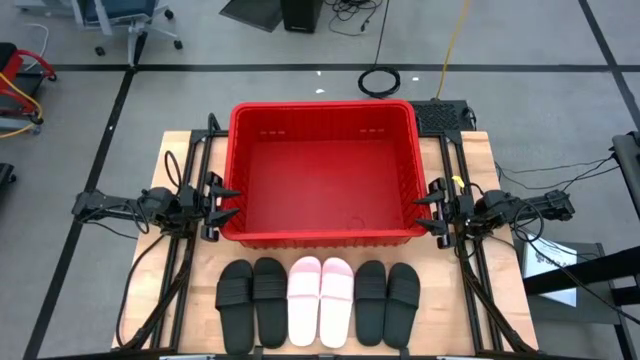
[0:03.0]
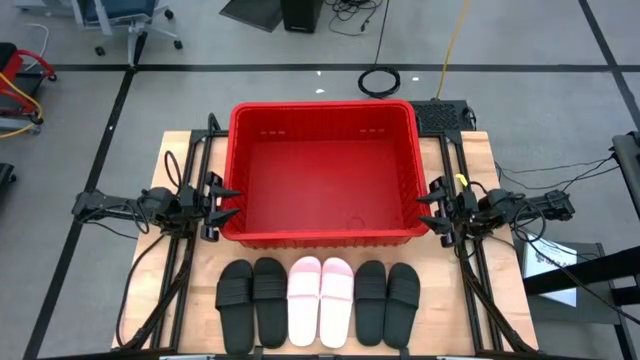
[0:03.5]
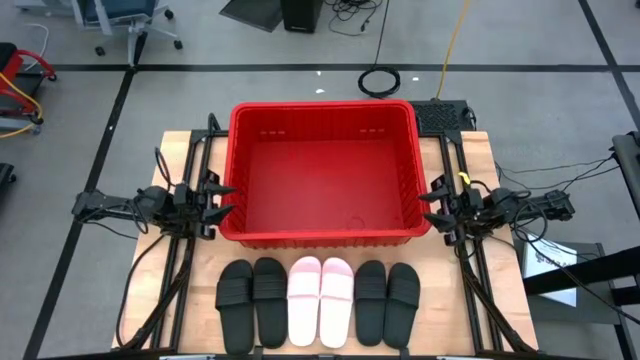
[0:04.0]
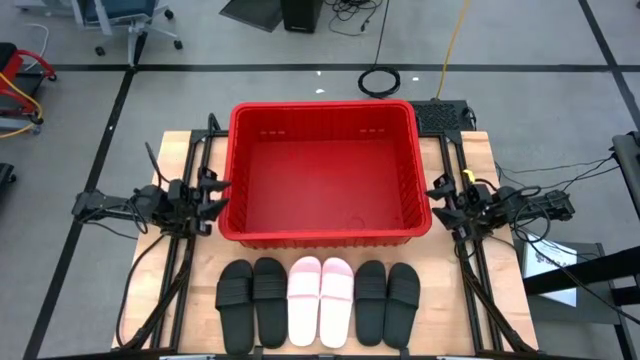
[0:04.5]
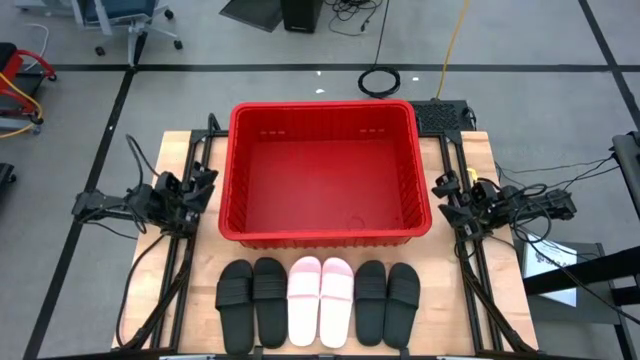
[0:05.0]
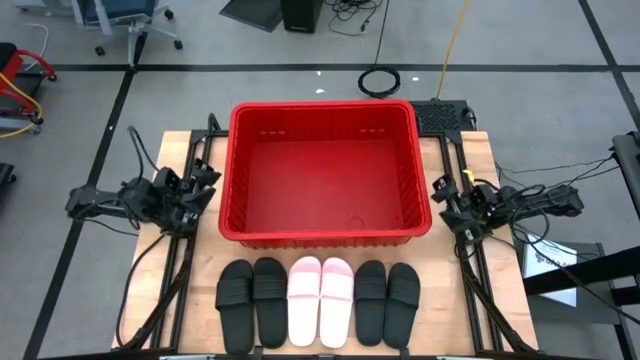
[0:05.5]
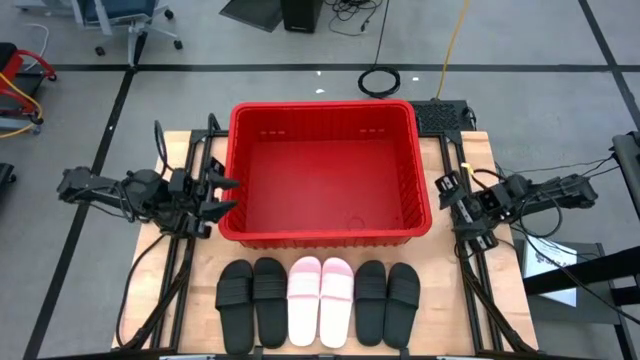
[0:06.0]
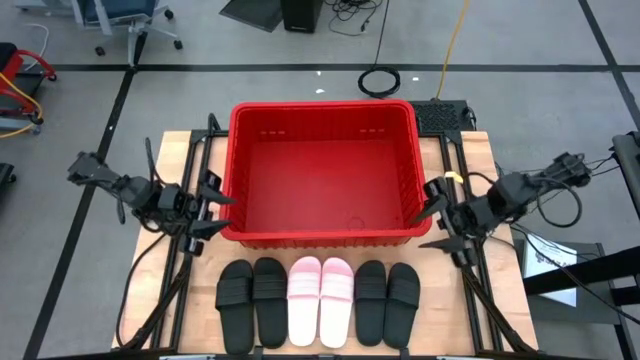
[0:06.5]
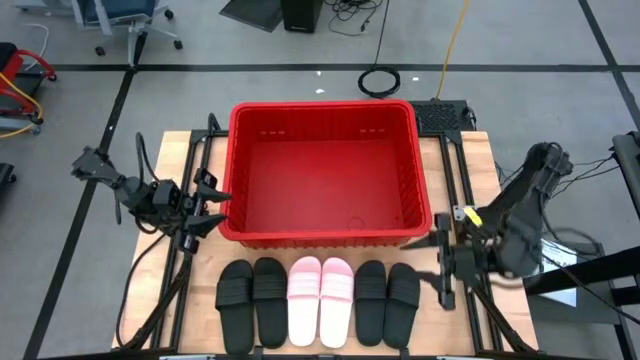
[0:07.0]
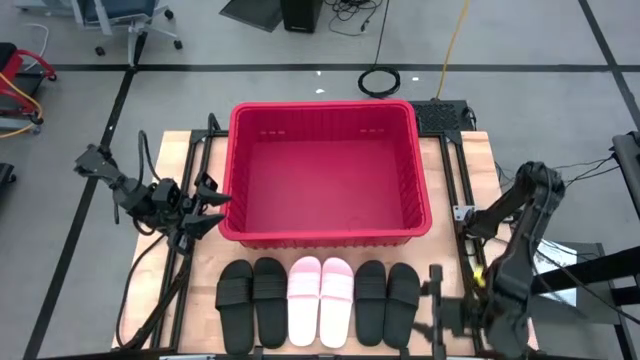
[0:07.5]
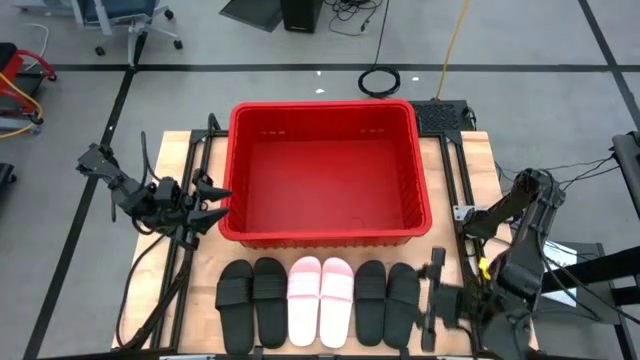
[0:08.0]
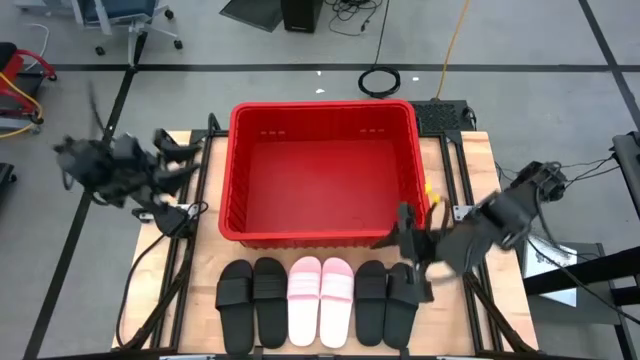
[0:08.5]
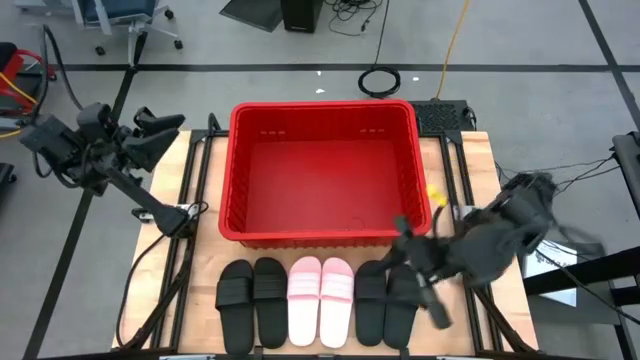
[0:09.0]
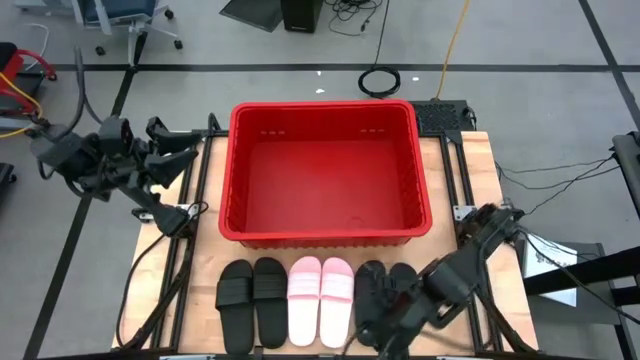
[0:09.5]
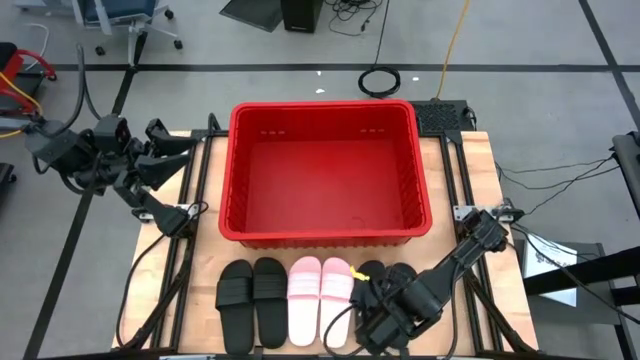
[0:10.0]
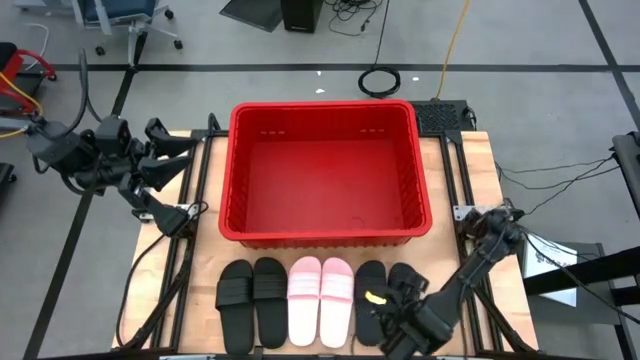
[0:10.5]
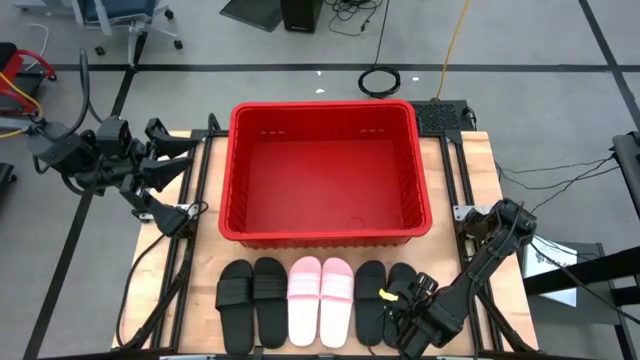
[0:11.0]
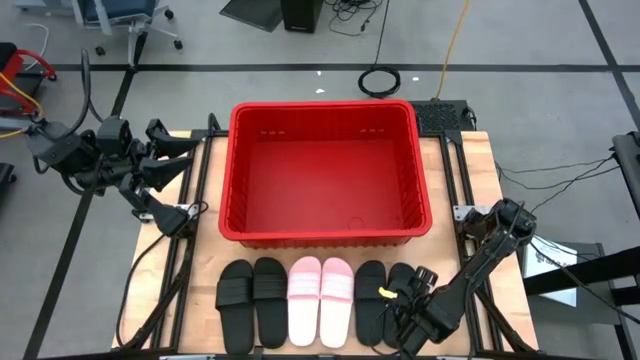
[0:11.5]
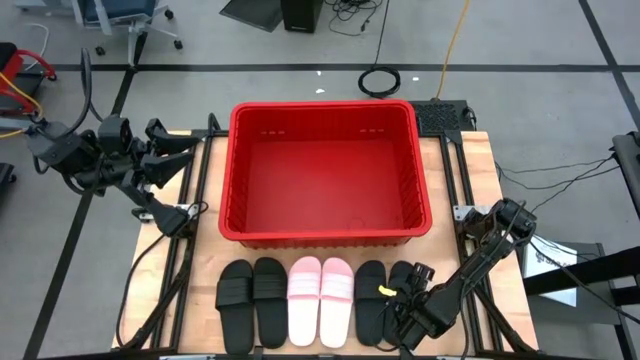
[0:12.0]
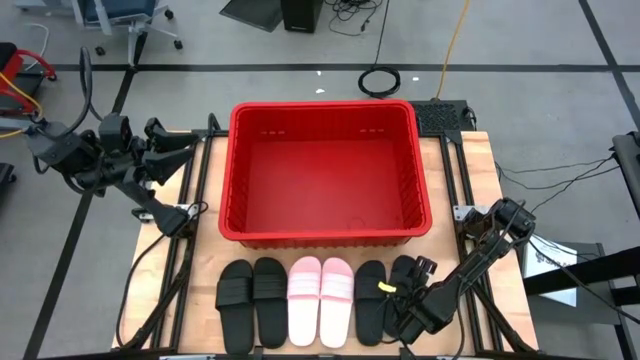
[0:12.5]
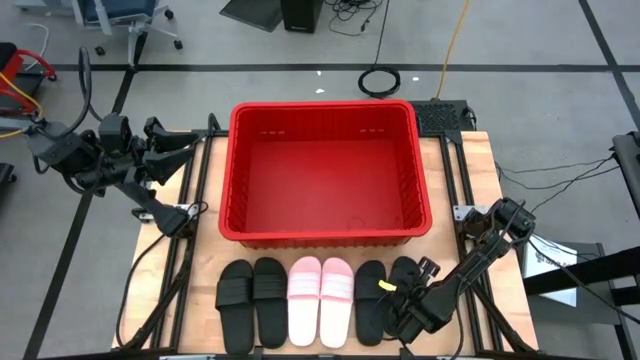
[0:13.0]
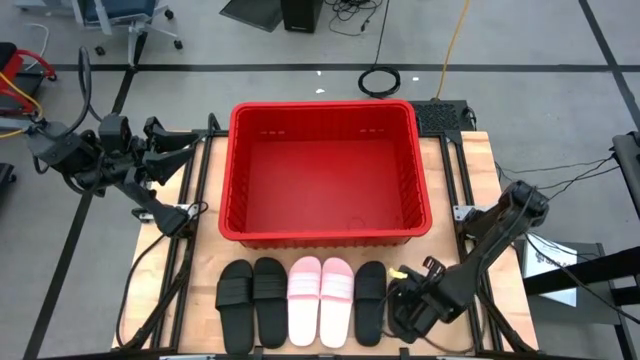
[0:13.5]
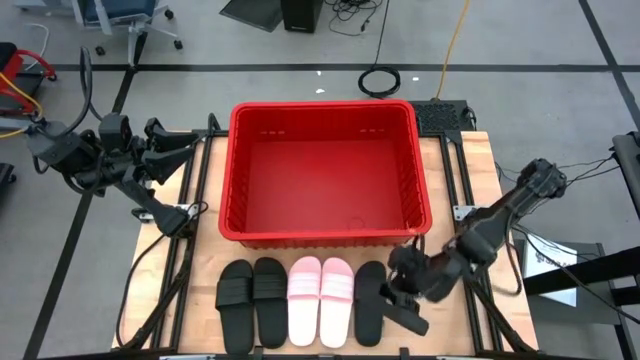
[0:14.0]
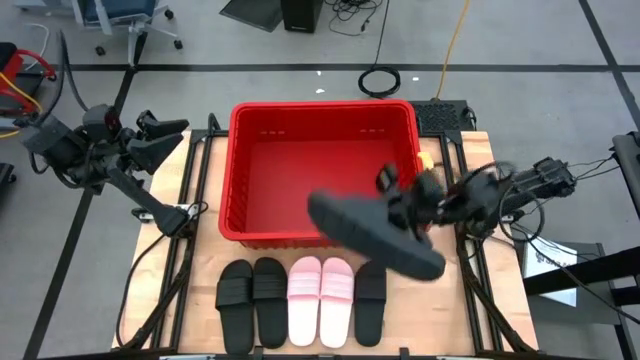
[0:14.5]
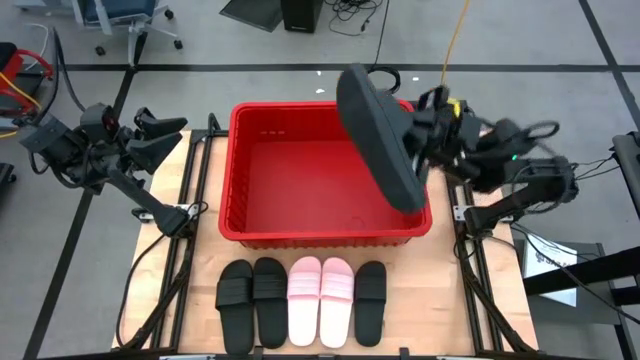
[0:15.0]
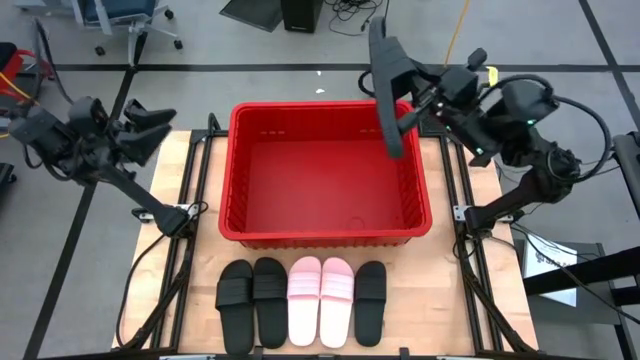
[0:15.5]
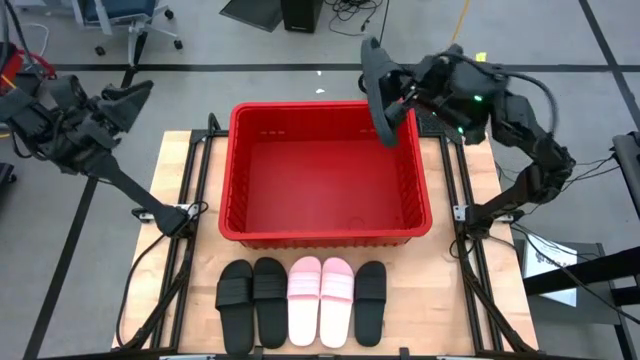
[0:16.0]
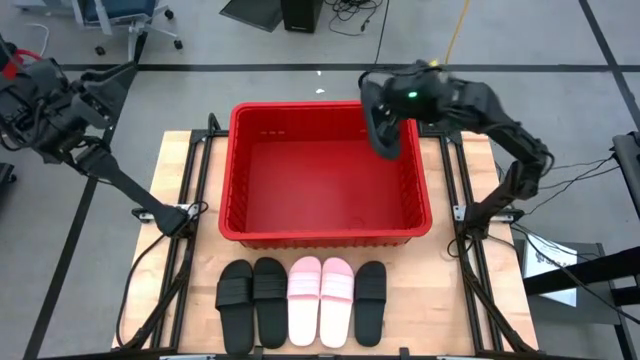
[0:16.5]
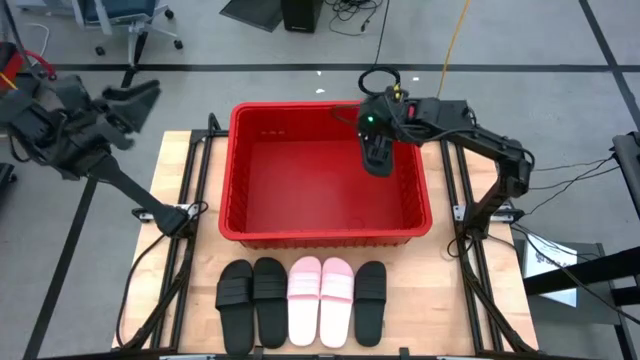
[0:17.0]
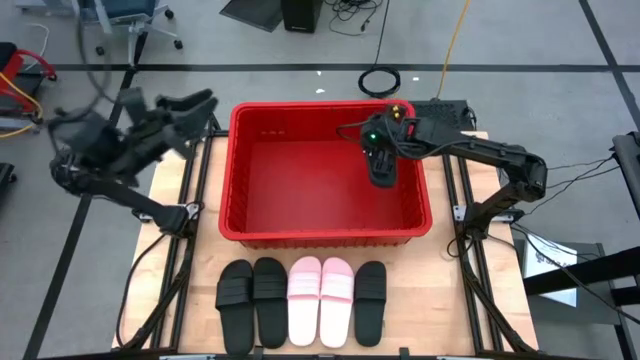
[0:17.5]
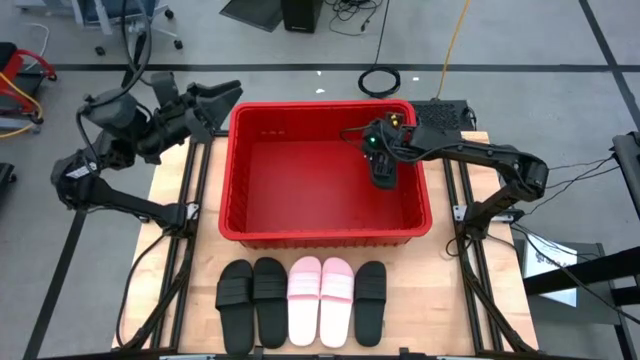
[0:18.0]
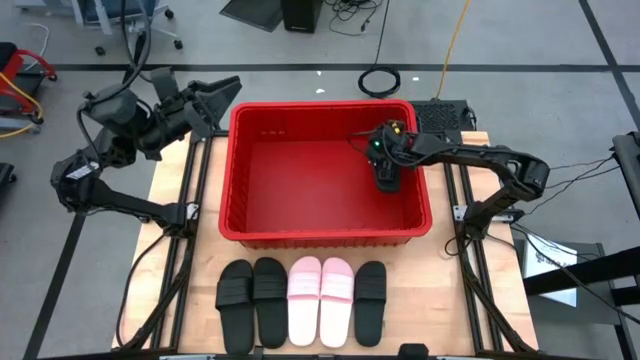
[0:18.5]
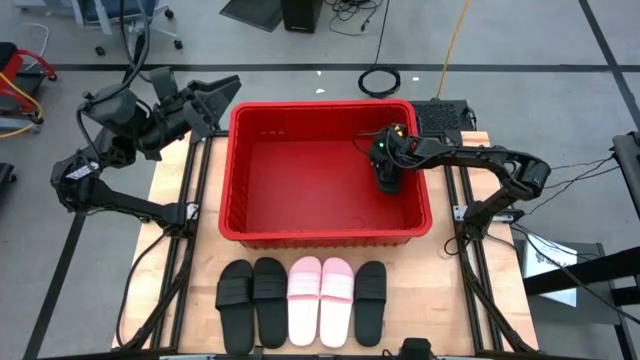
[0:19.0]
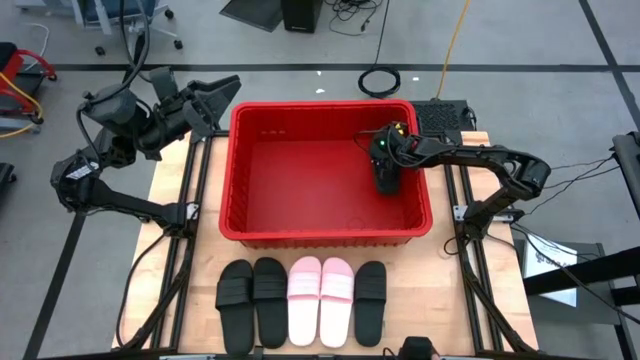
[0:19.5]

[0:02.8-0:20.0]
Task: Pick and place slides into bin
Put the black slide into the red container

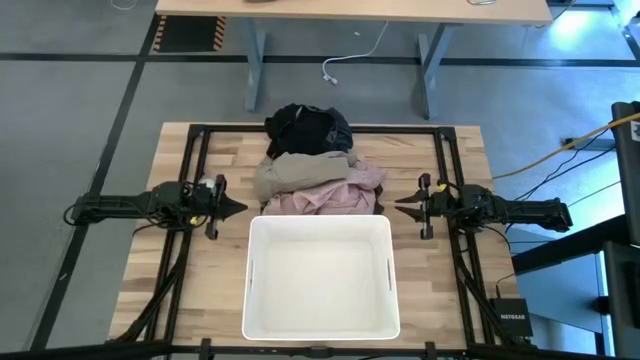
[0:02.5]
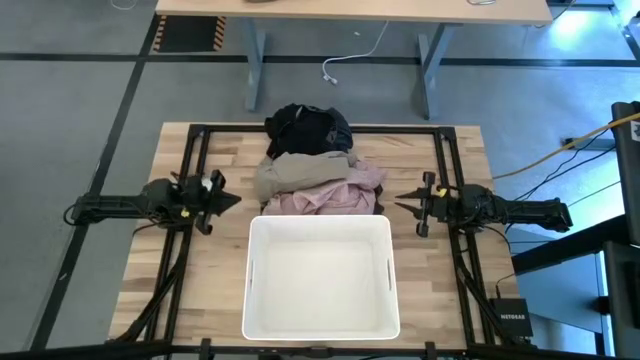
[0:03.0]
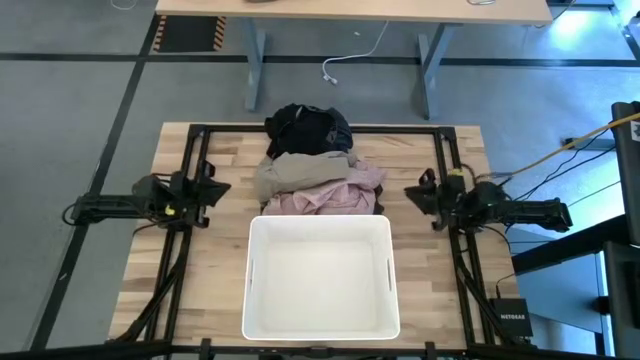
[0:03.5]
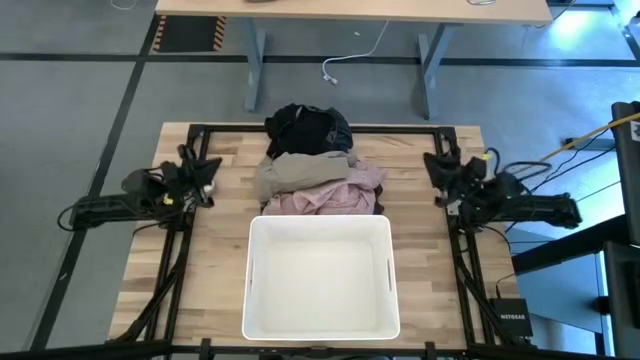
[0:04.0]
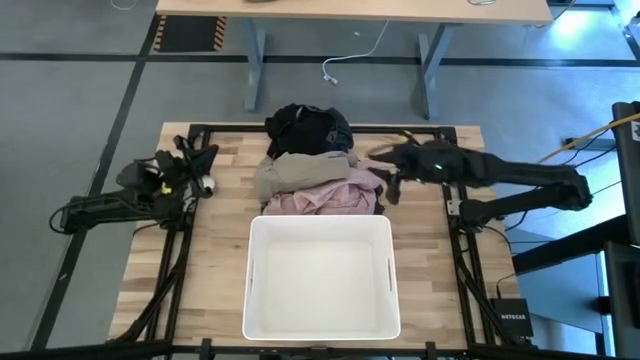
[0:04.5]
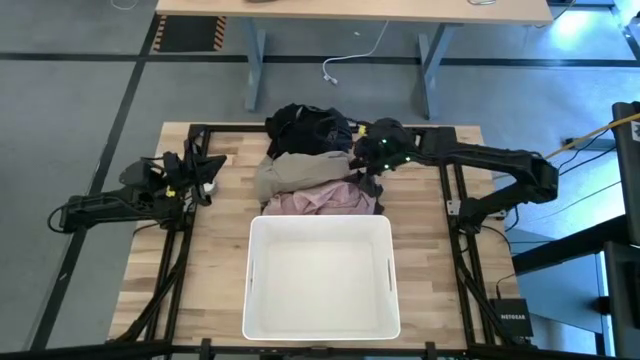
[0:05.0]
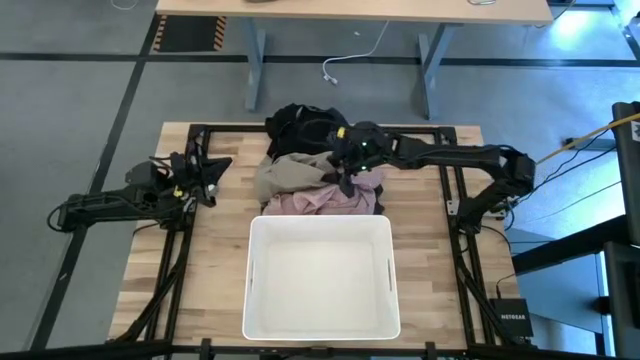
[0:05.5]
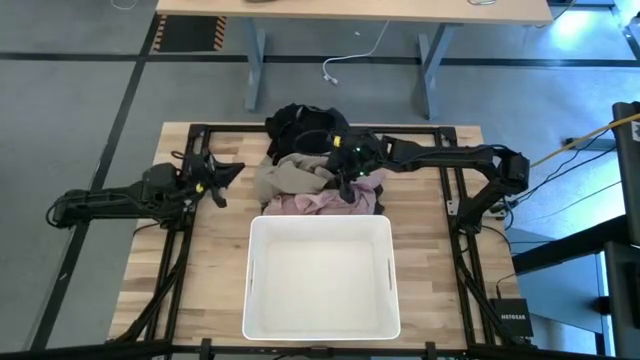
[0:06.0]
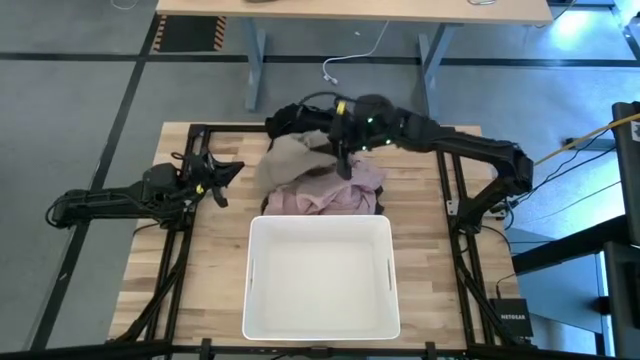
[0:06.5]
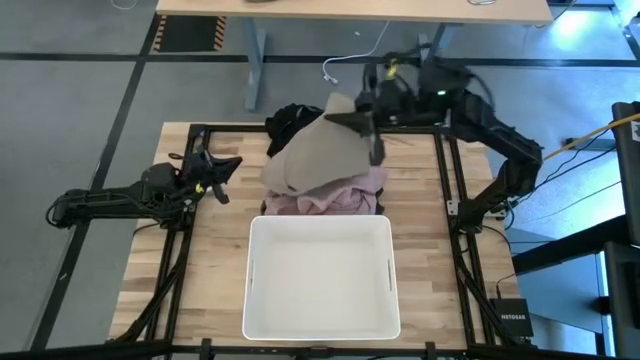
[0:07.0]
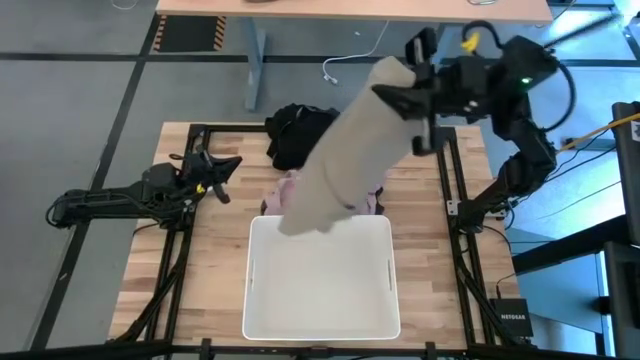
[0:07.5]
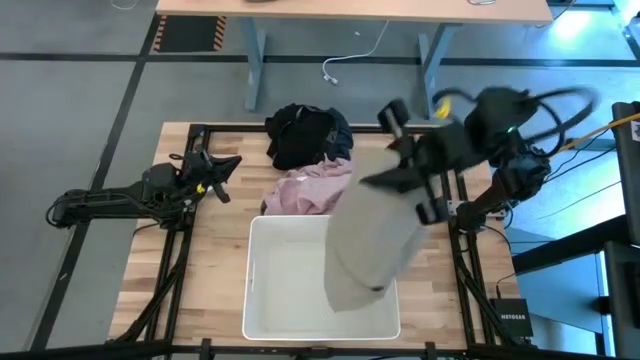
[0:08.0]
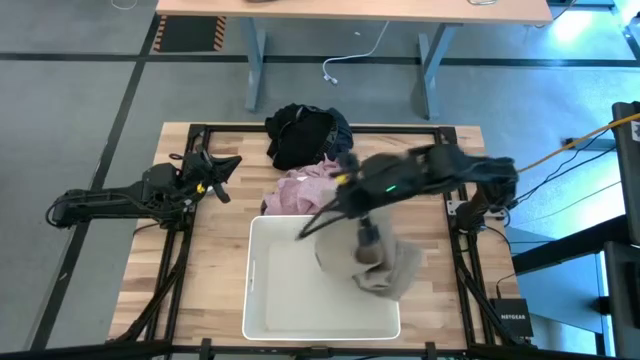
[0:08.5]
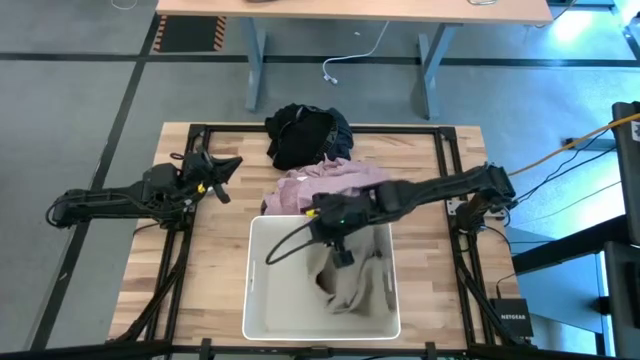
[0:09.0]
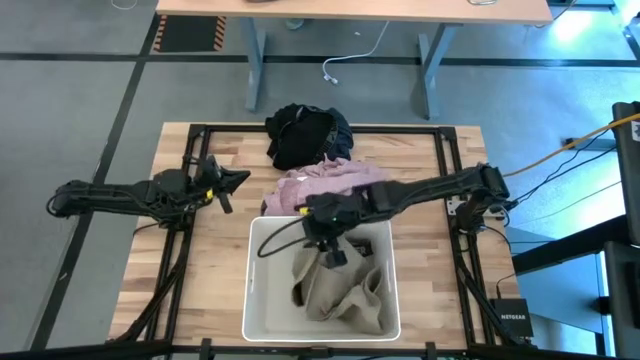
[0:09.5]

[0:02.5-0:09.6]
Task: Sort clothes
Put the brown shorts into the white bin
